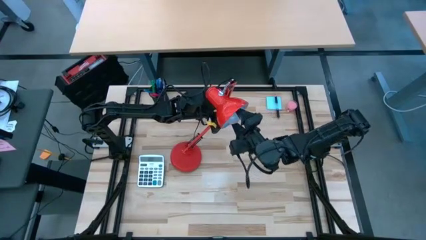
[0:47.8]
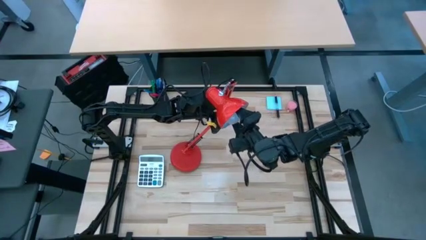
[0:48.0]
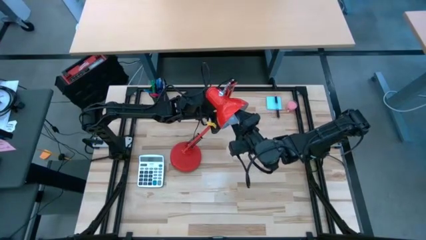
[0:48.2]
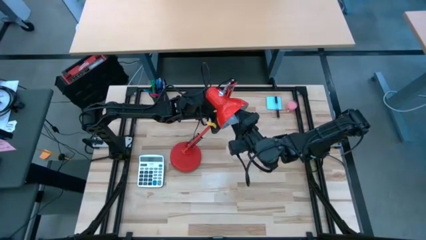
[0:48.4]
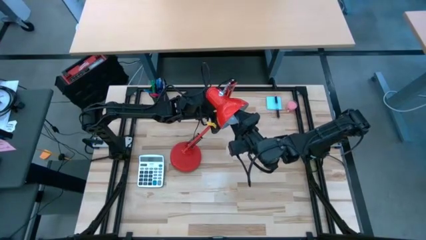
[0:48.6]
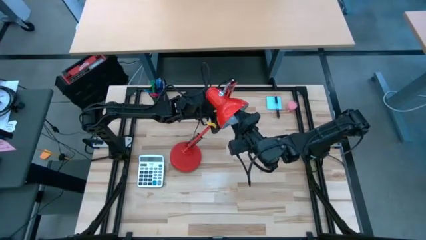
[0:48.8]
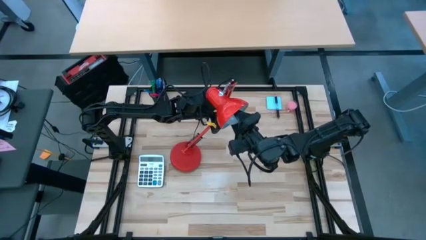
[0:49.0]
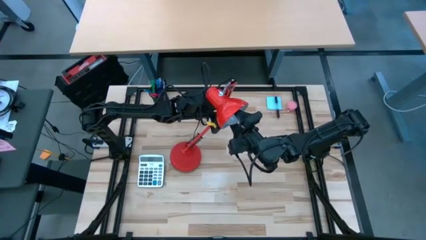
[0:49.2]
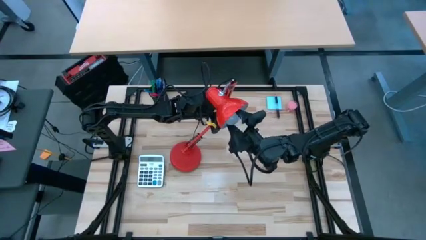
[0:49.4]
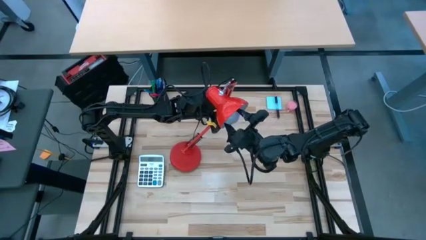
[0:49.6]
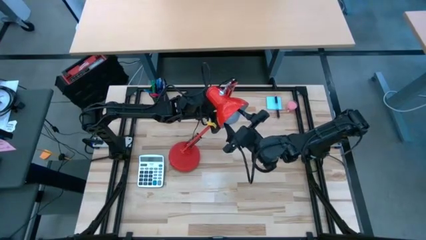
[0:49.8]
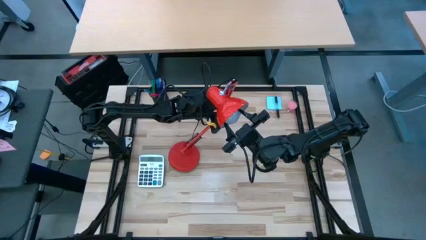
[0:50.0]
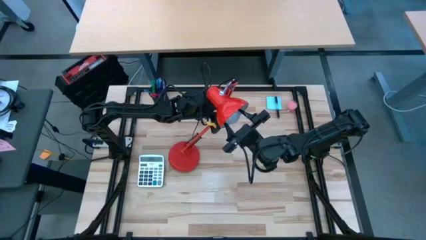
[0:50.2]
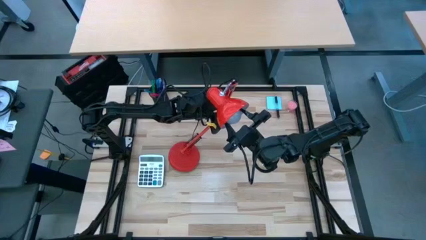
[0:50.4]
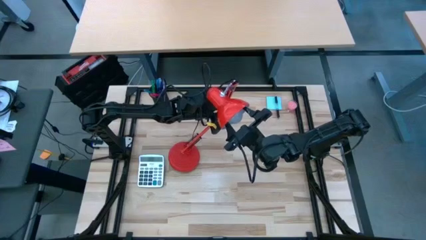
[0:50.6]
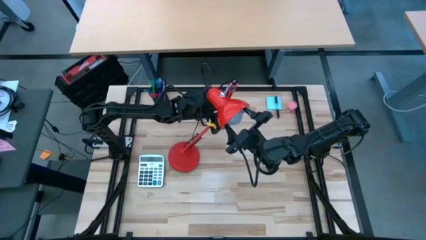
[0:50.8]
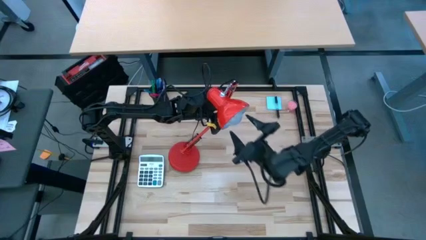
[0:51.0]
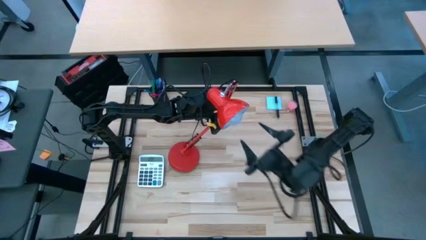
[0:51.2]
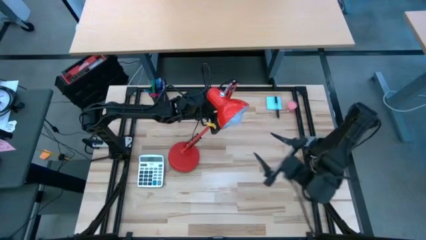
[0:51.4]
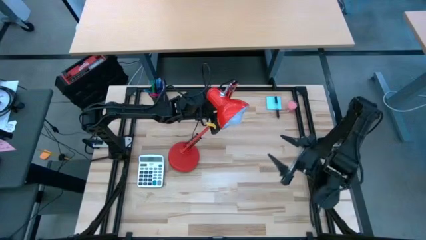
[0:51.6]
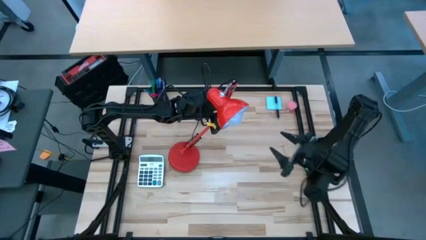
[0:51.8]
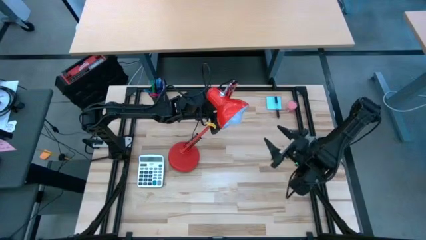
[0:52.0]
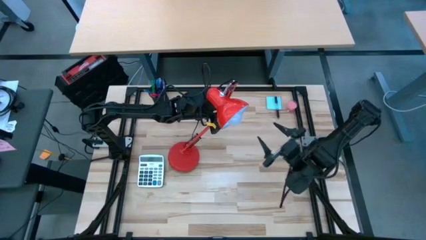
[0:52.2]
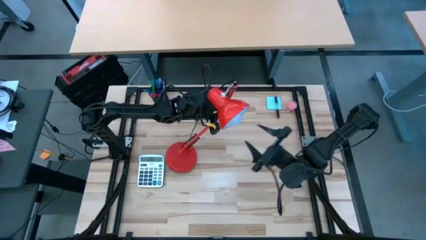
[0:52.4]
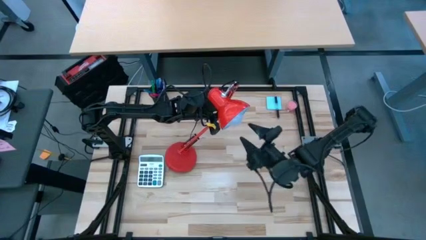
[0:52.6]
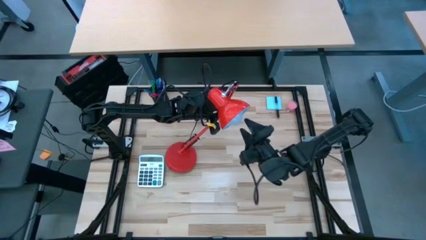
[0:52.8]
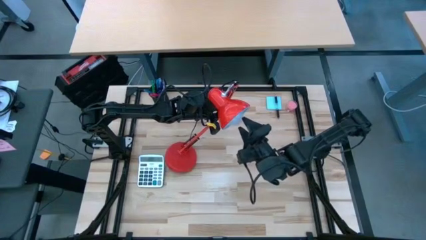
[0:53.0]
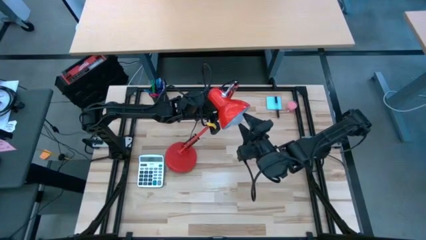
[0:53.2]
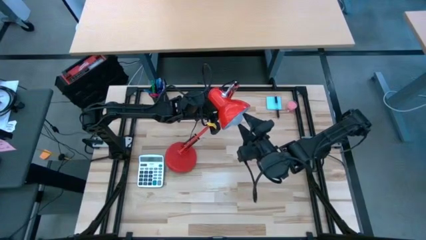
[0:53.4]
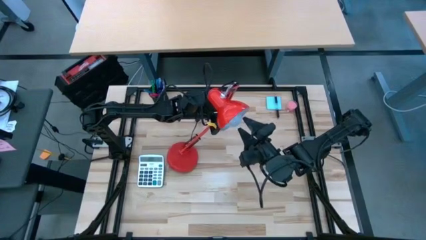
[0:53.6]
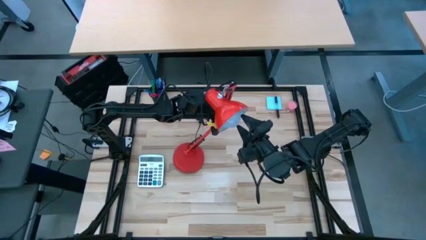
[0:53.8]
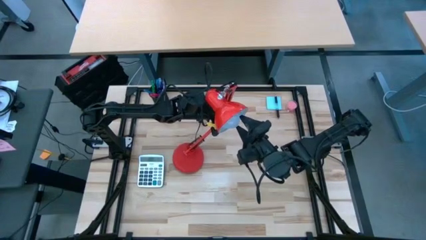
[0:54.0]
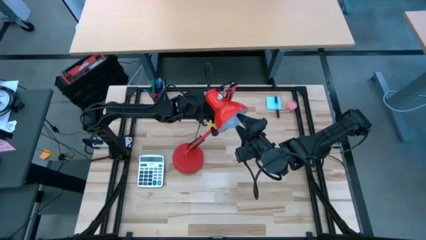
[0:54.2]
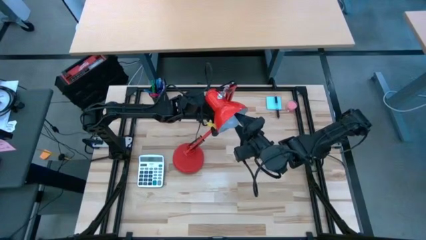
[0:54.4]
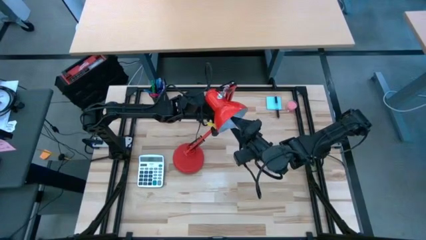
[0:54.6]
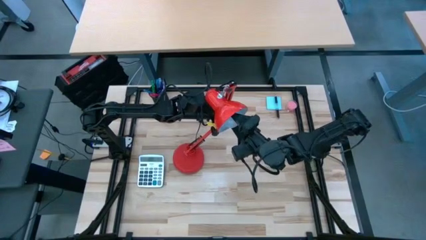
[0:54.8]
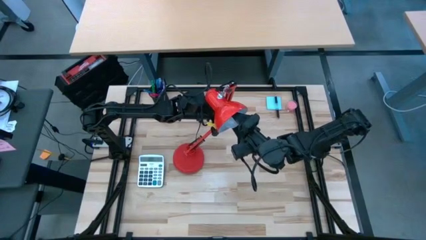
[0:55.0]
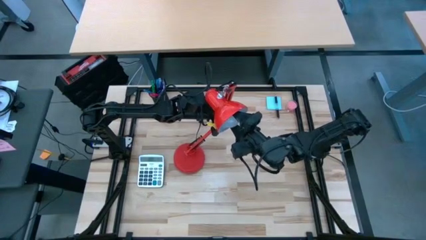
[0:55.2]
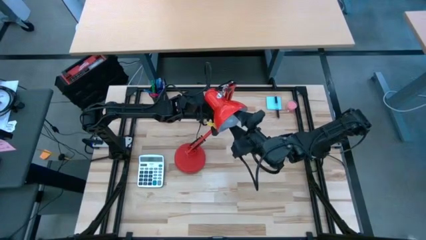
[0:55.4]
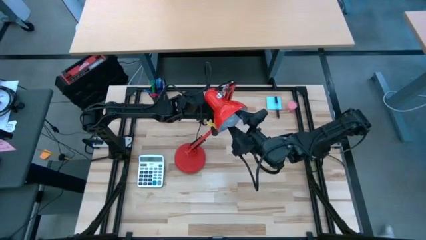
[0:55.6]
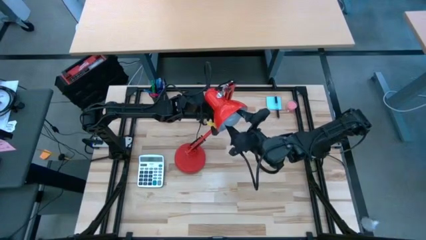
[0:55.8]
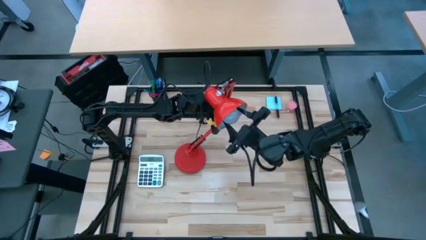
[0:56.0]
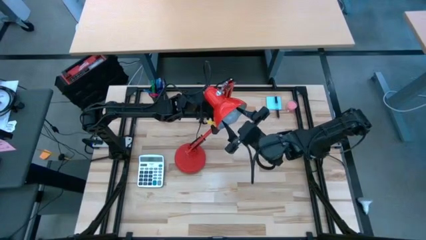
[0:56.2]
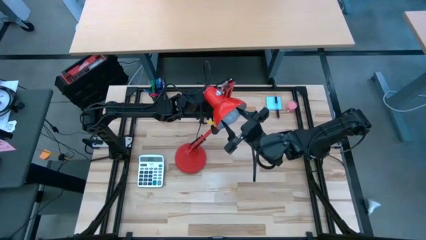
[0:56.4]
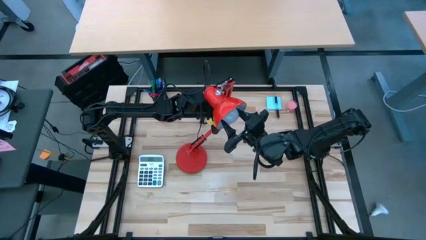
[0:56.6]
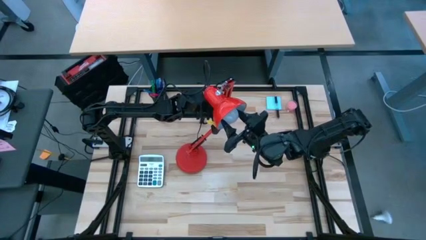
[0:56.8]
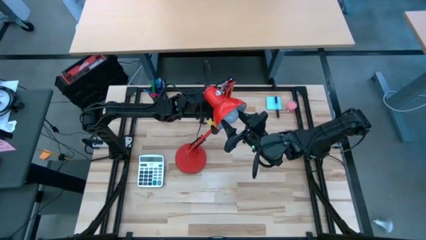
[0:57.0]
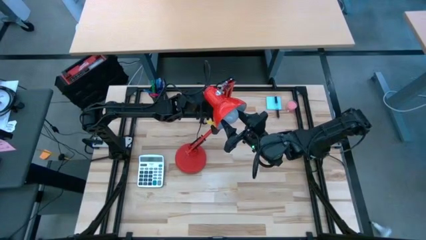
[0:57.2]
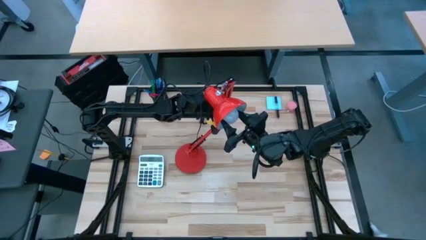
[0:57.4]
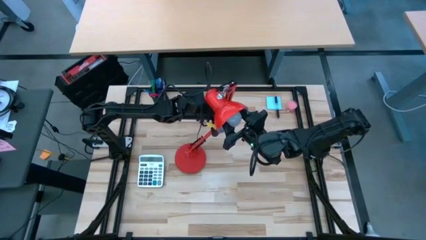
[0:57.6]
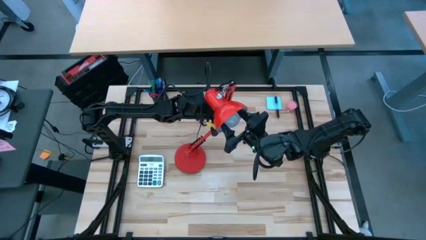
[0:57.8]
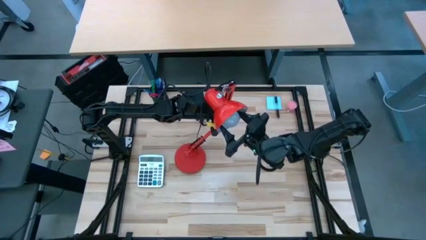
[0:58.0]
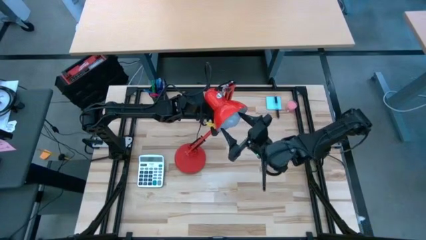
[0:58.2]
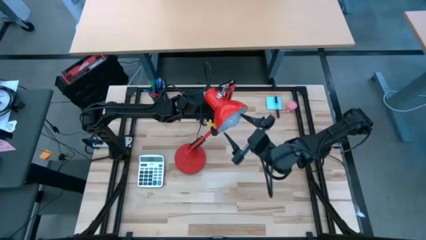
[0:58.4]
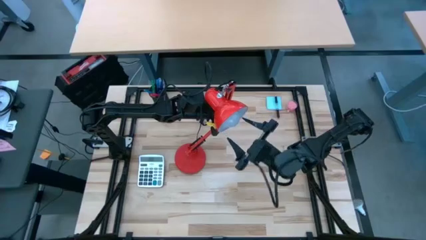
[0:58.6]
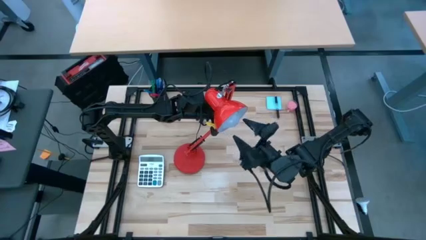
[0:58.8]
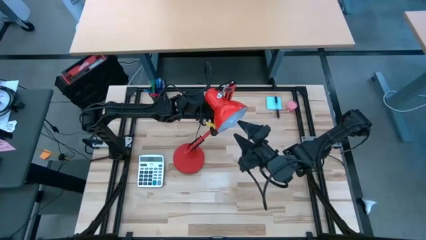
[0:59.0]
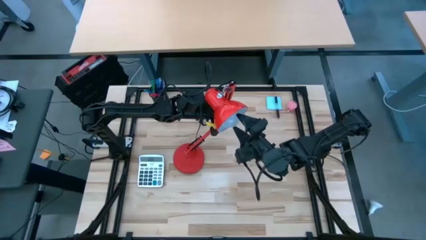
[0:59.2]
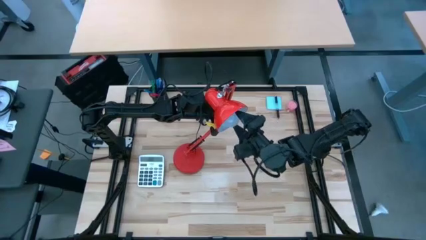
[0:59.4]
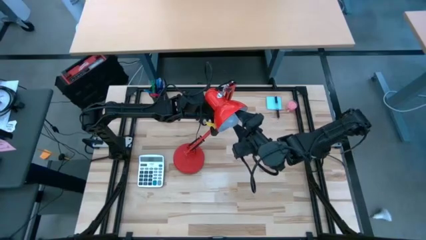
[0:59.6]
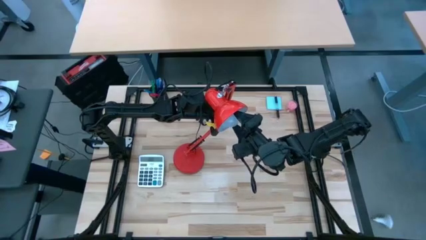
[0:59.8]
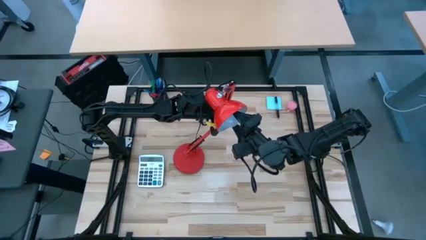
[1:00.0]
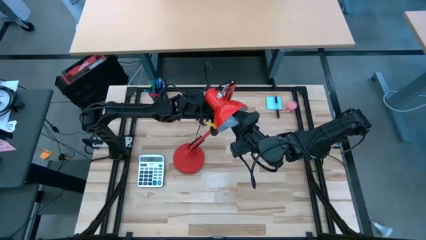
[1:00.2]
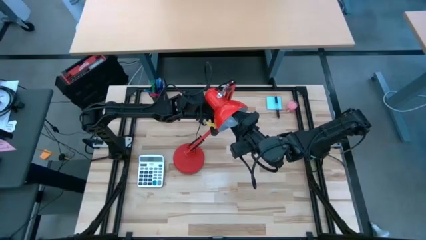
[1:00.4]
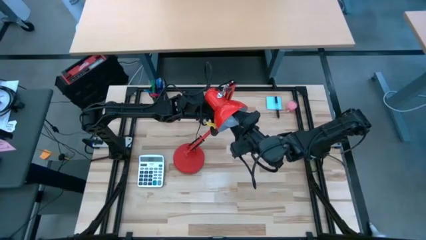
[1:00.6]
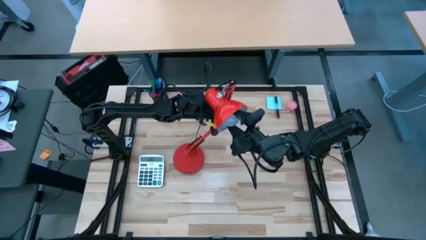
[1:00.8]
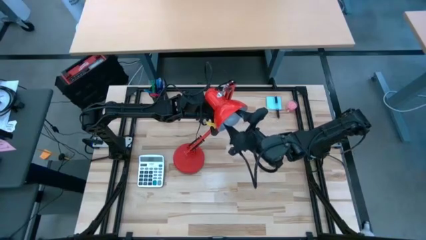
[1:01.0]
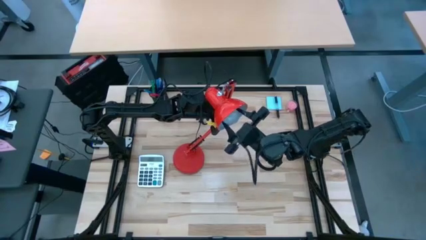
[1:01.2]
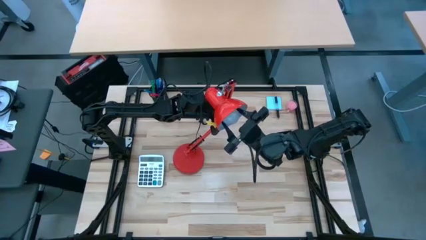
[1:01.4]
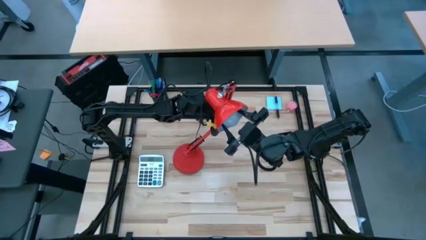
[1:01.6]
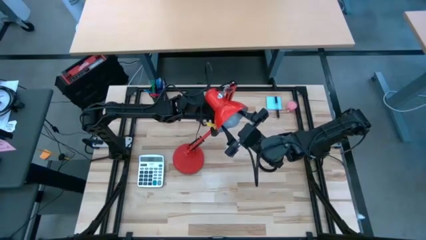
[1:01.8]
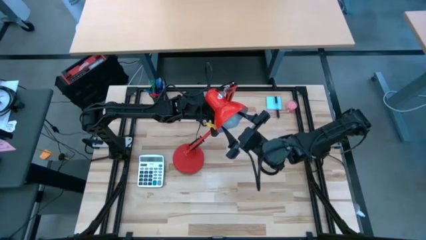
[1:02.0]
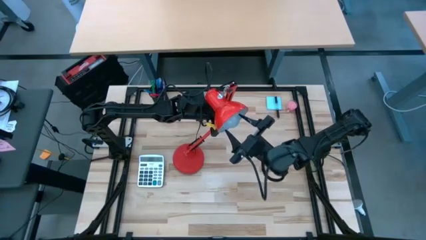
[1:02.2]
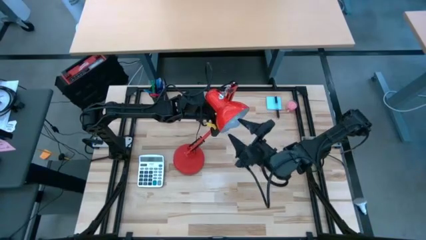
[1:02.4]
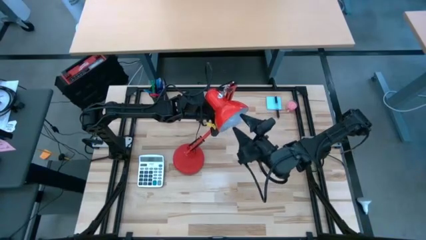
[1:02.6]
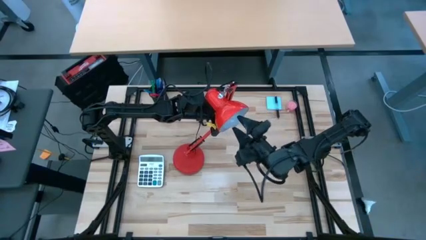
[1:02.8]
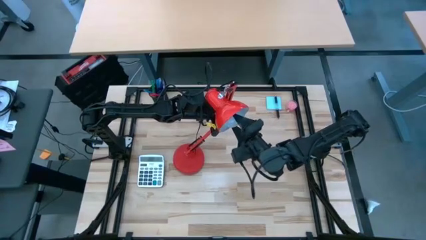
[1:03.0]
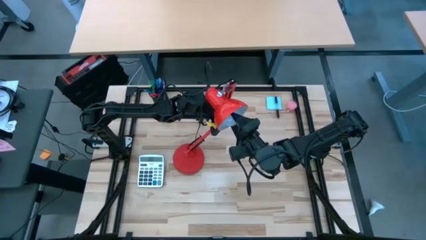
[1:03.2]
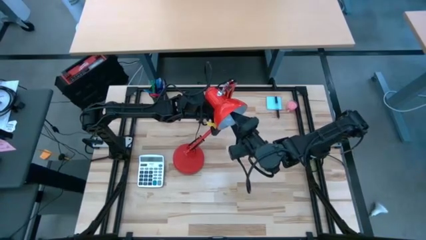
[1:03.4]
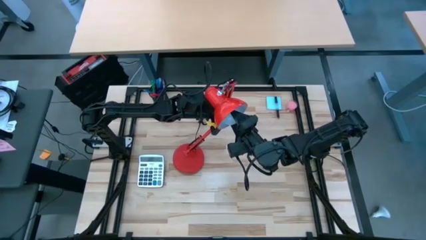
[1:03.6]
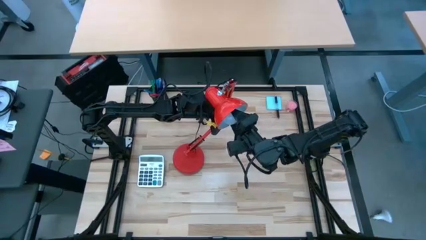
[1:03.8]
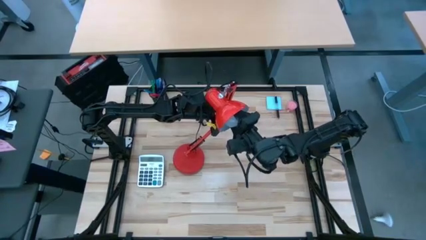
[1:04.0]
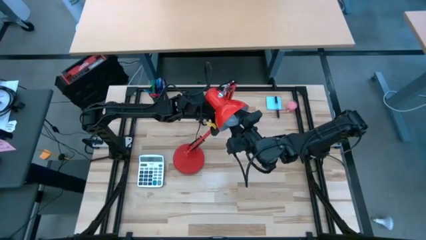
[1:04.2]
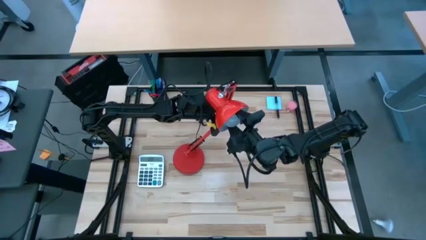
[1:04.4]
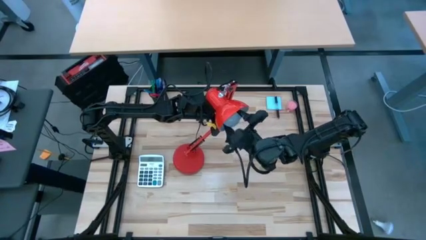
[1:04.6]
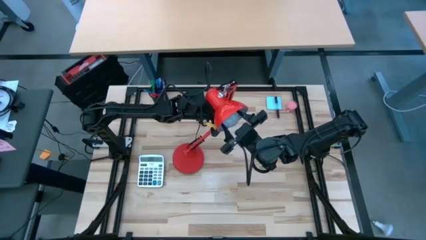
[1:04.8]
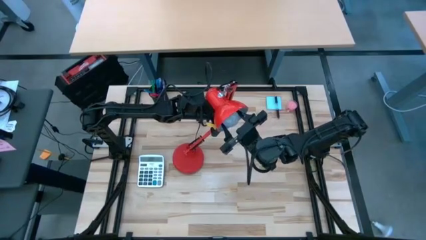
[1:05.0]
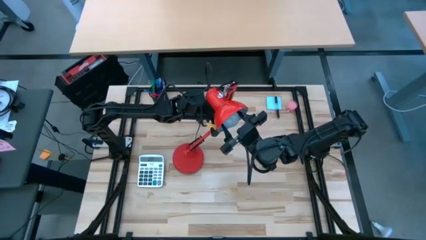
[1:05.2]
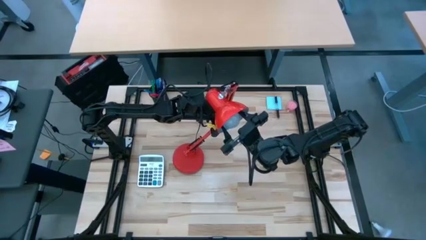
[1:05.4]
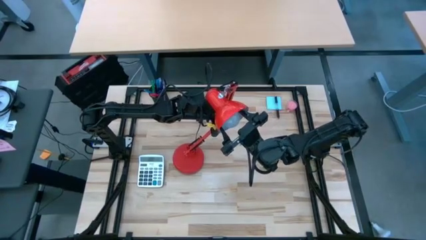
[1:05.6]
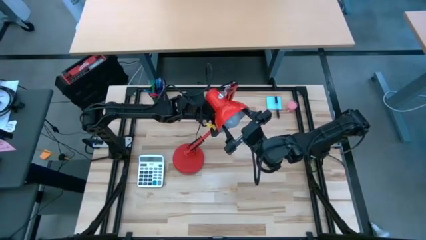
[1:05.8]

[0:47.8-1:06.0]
Task: Screw lightbulb
Insert the white lightbulb into the red desk lamp
